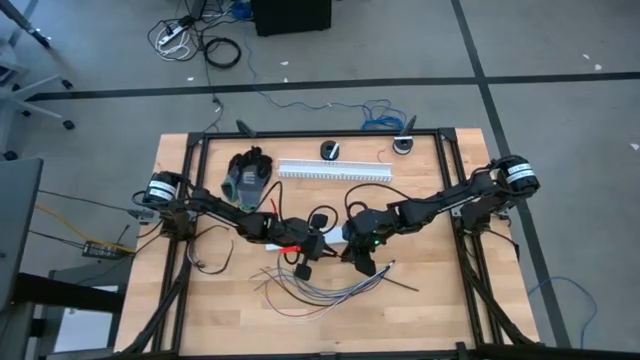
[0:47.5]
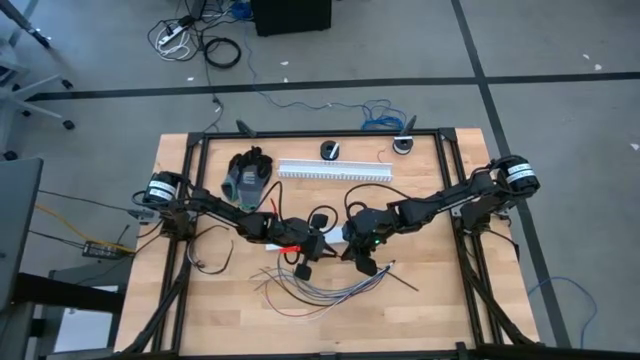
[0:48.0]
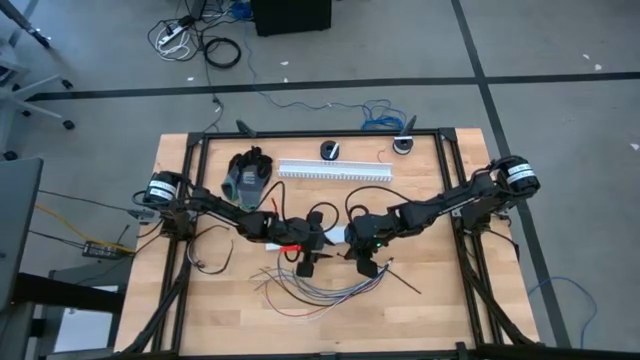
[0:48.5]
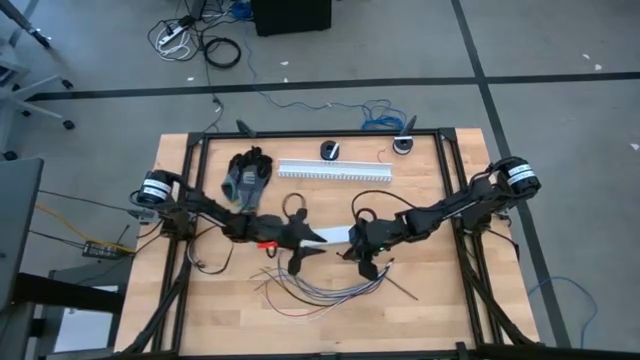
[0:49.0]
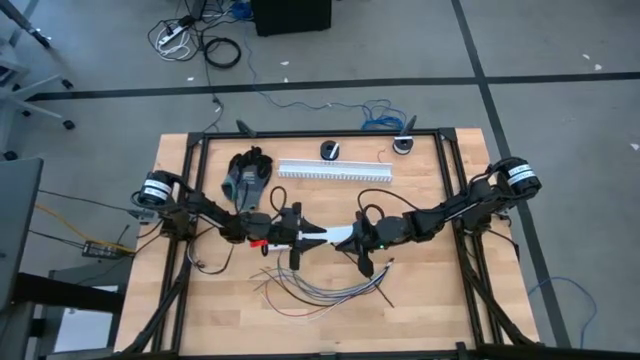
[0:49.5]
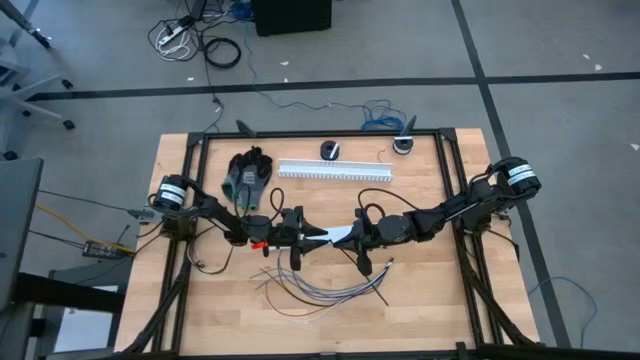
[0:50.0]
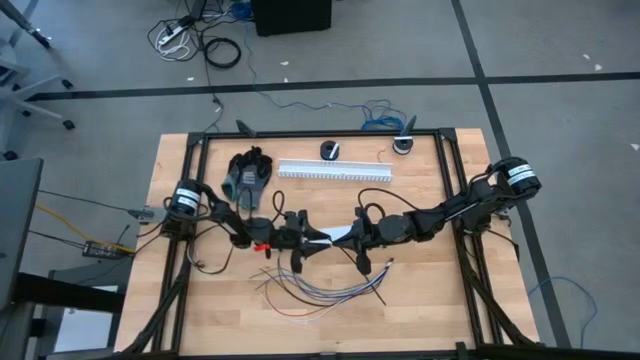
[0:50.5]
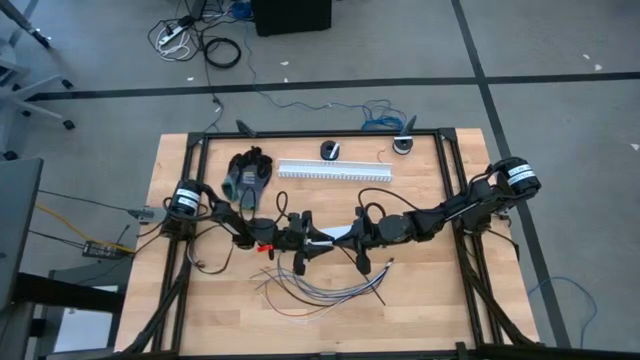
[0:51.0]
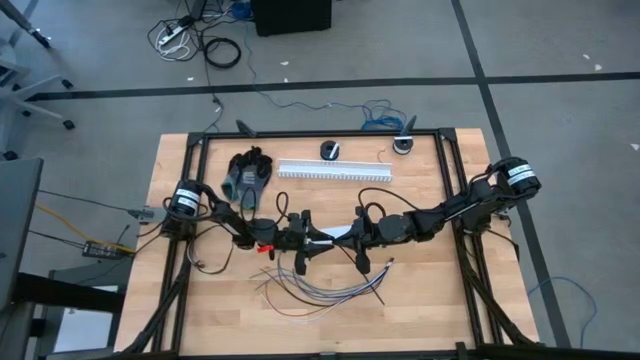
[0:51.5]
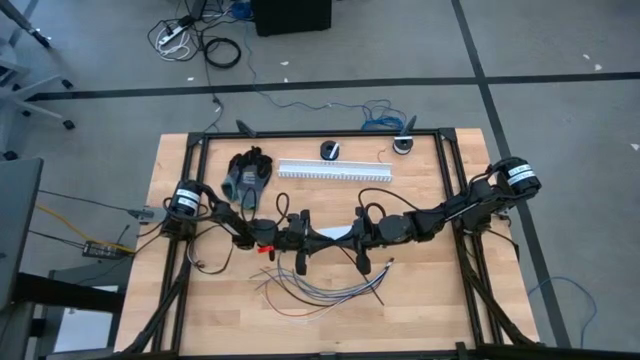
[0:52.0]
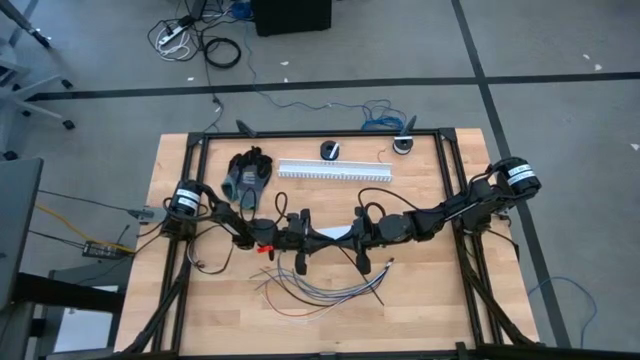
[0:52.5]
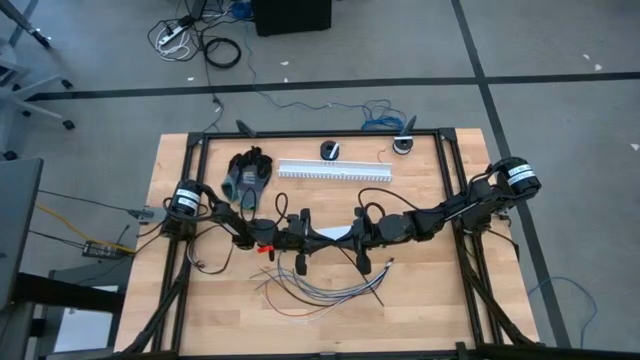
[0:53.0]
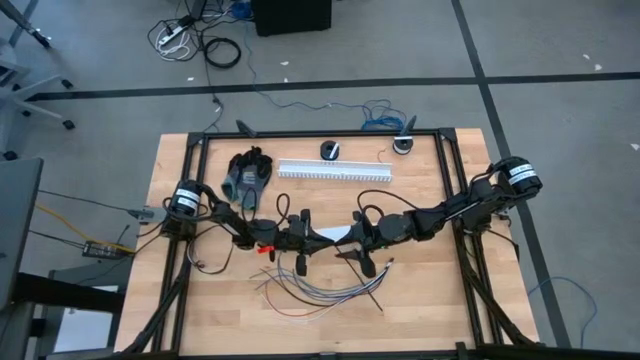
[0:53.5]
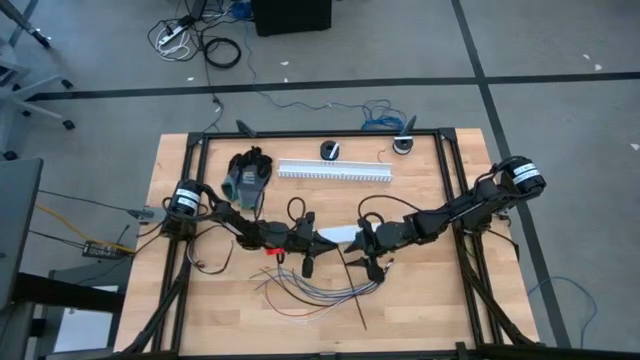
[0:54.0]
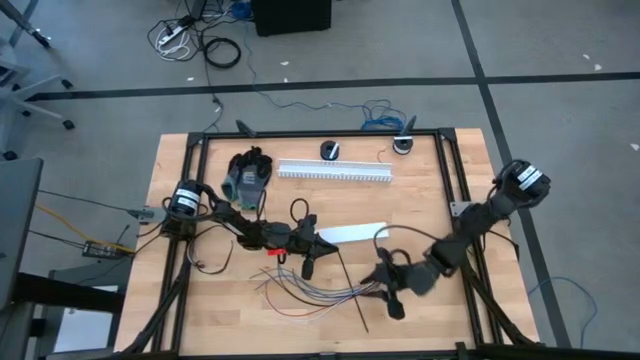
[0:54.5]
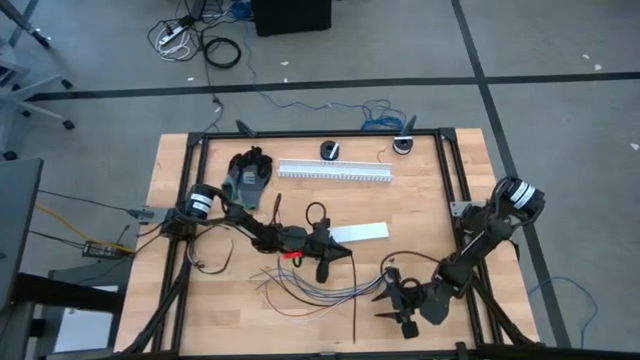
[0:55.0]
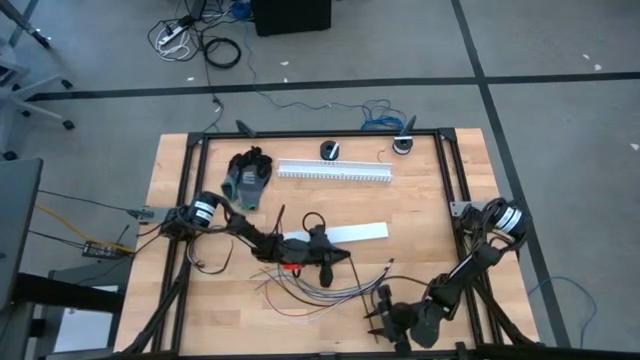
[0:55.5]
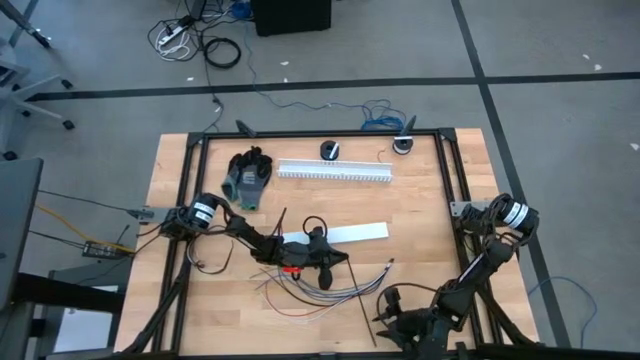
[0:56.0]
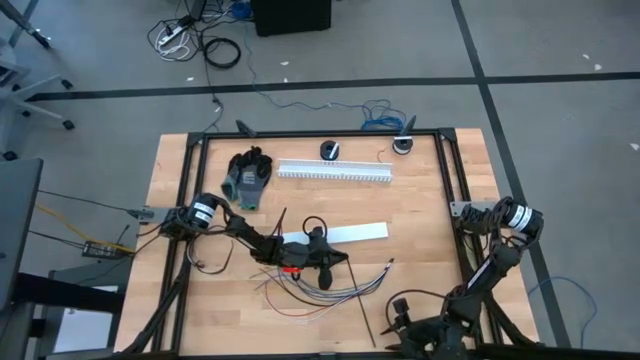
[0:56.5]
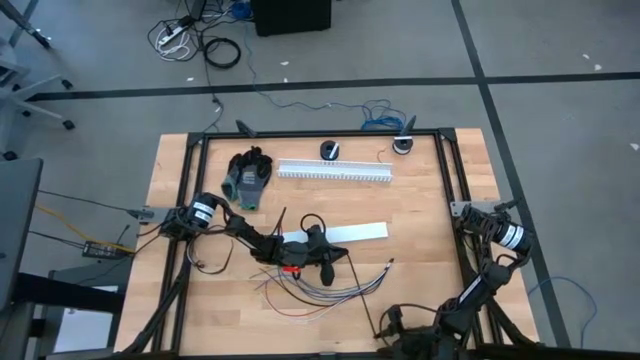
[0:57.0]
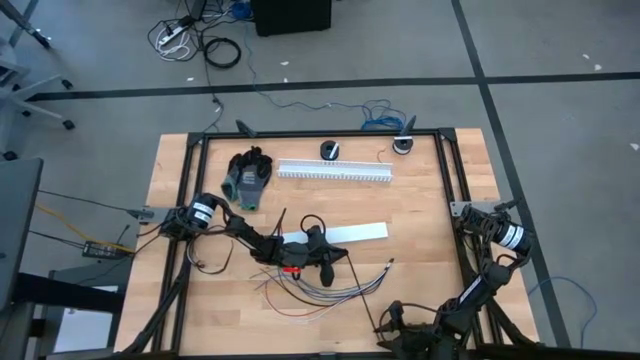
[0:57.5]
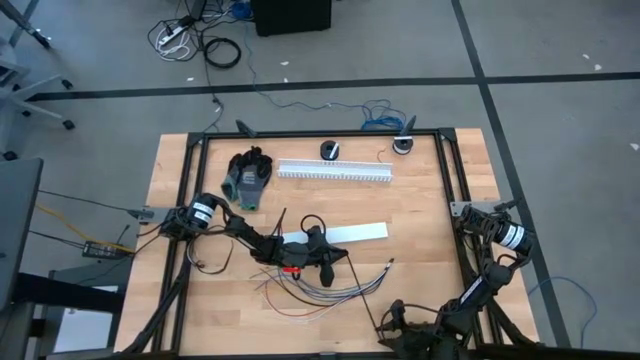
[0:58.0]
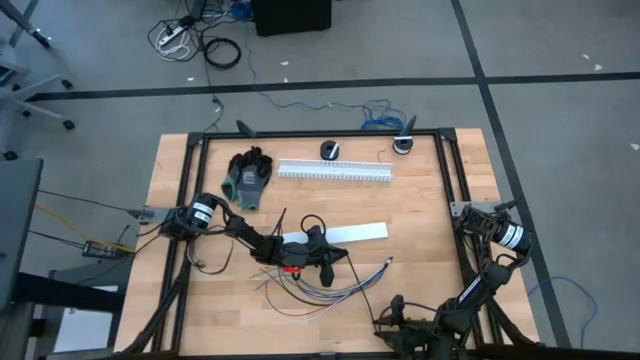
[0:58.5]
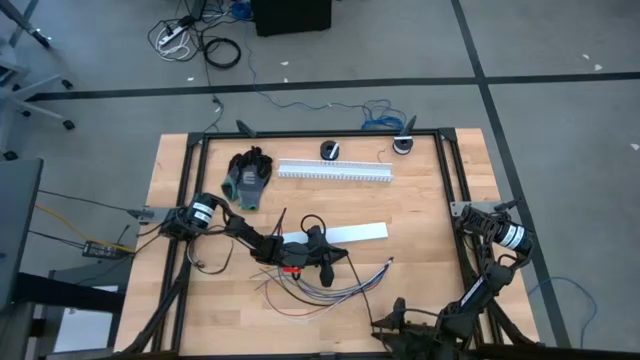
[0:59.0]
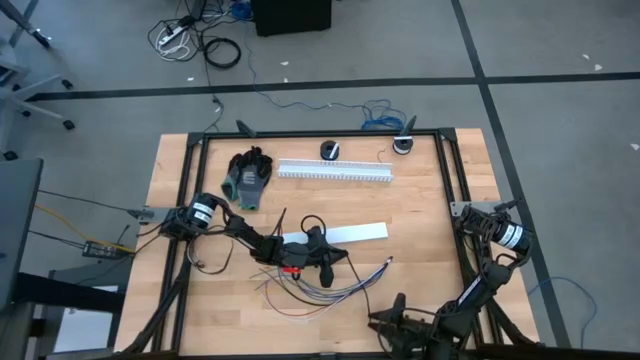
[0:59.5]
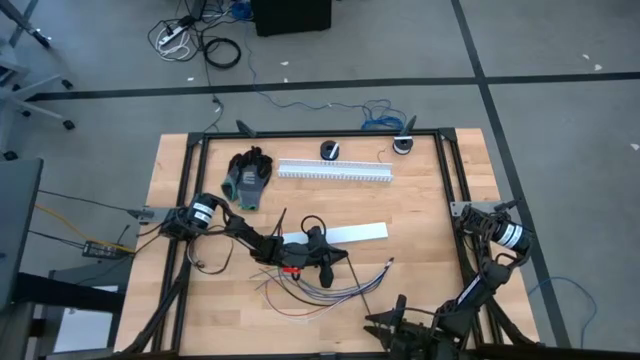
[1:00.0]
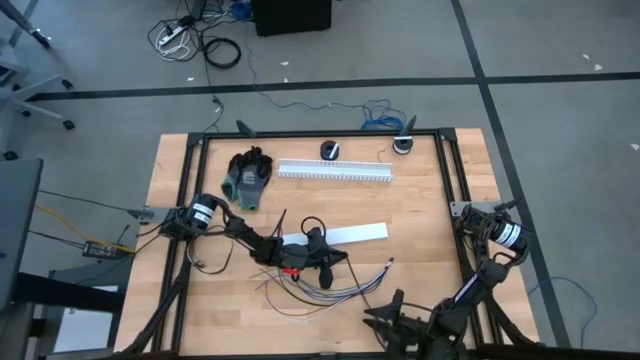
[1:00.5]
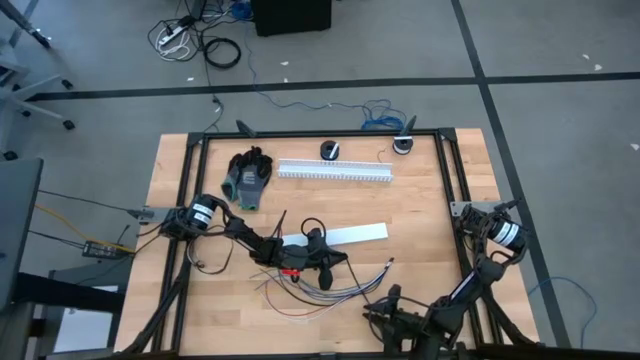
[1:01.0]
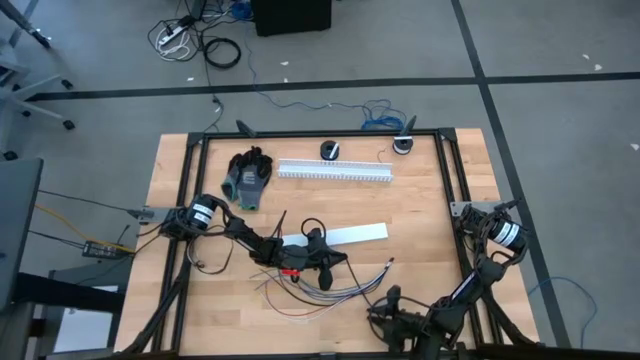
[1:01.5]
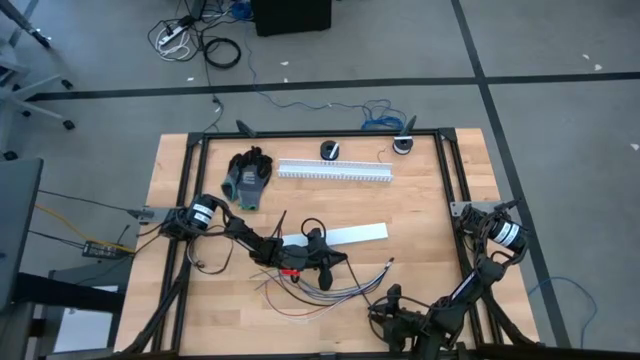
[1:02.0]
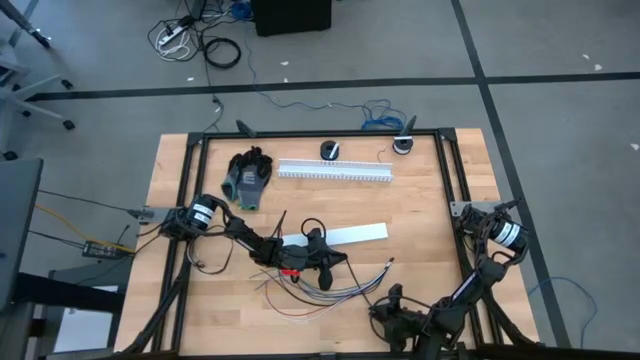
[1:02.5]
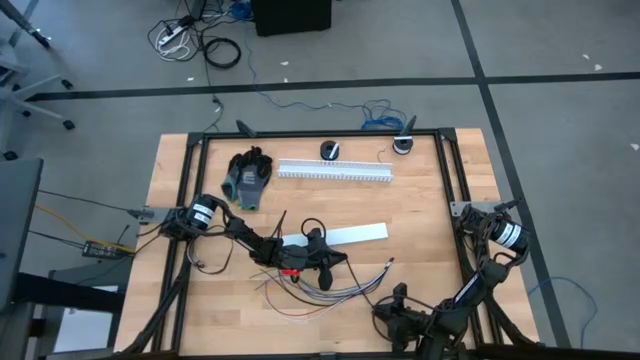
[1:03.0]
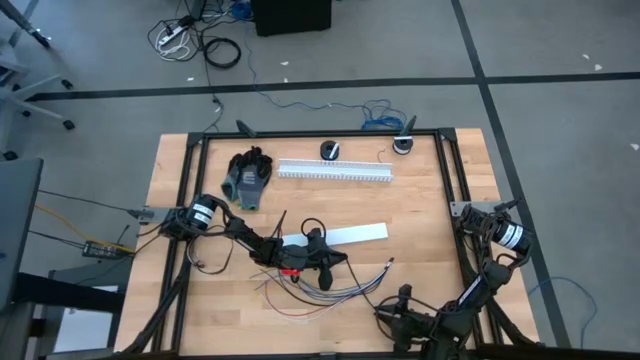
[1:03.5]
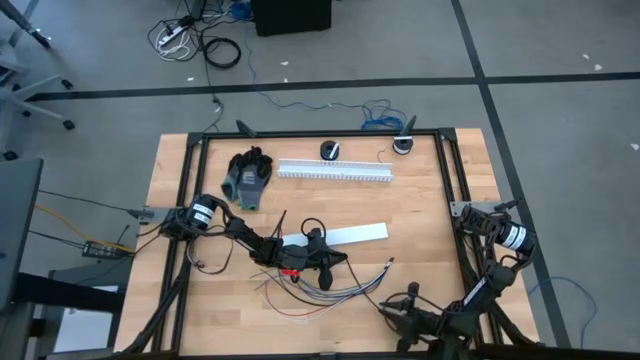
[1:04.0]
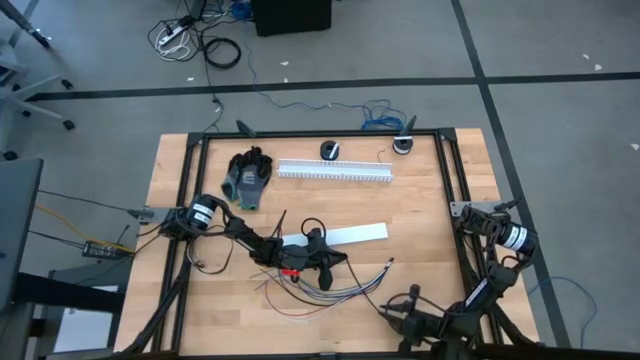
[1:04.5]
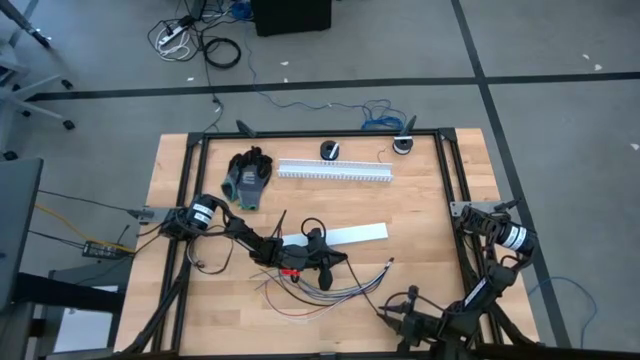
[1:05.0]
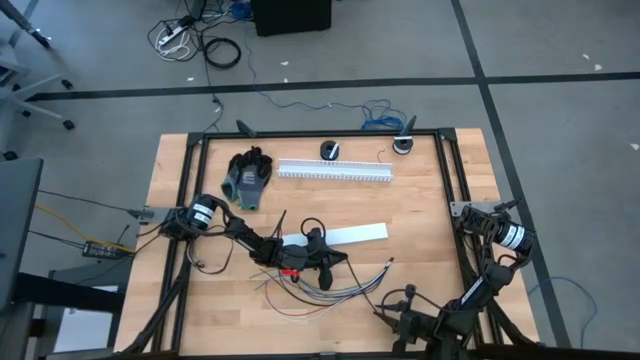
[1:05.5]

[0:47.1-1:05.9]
Task: Ziptie cables
Wrap the black zip tie around the cables

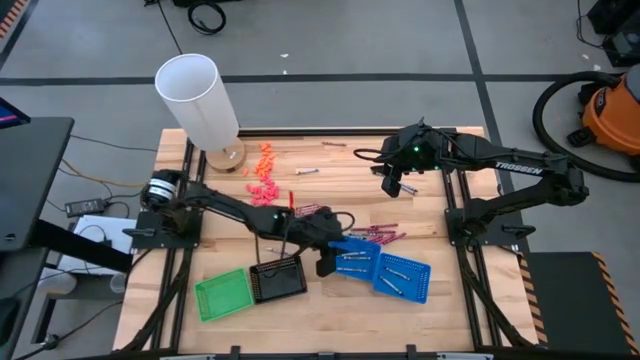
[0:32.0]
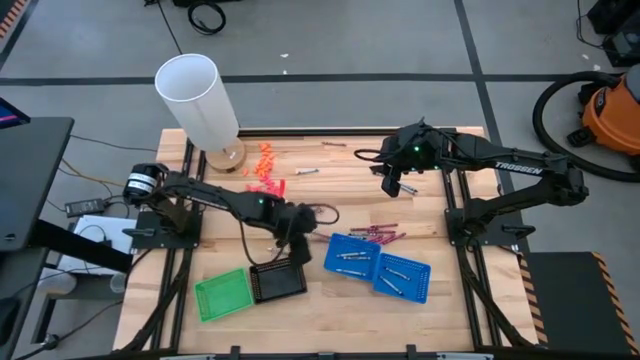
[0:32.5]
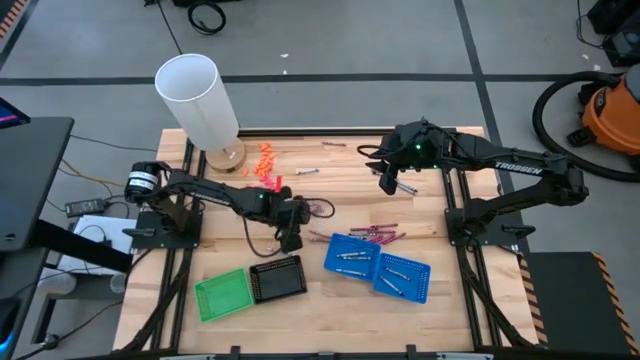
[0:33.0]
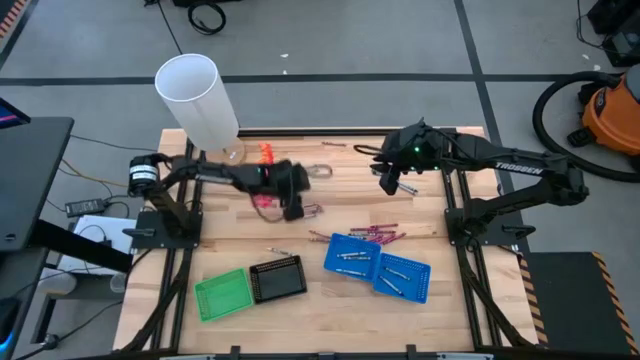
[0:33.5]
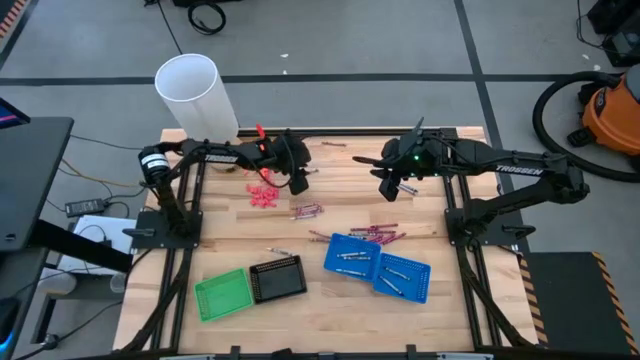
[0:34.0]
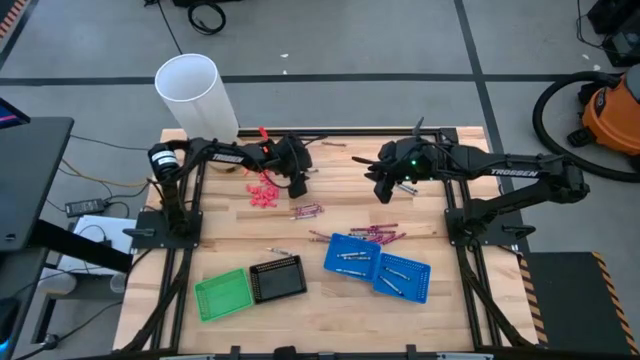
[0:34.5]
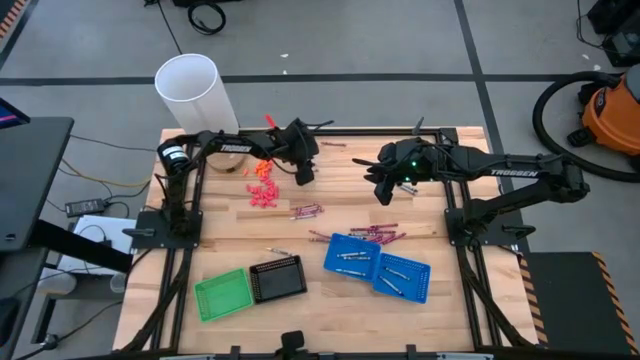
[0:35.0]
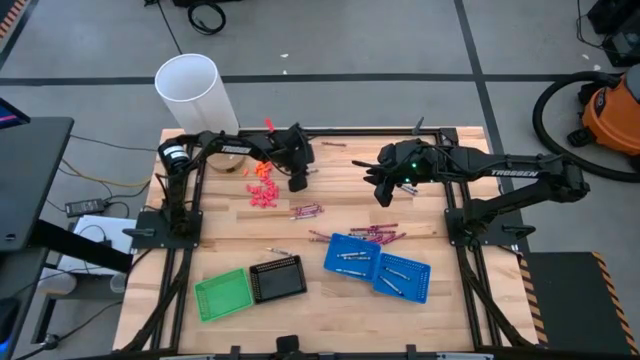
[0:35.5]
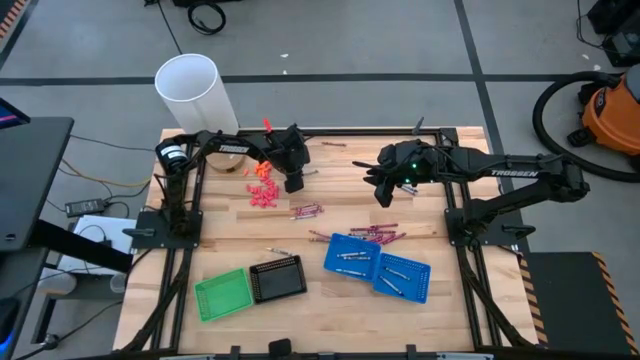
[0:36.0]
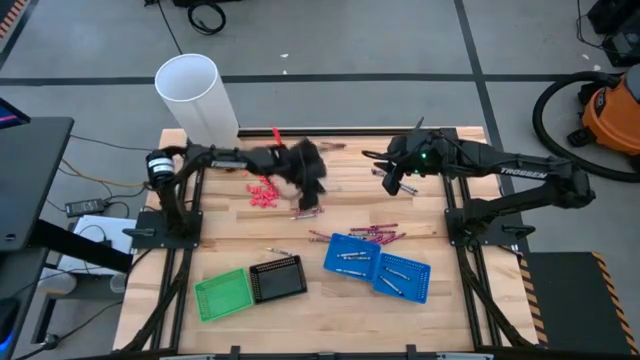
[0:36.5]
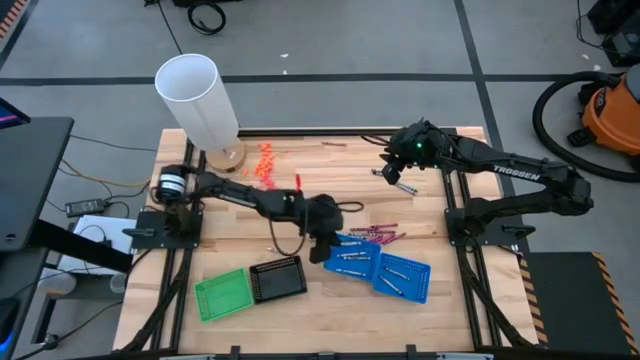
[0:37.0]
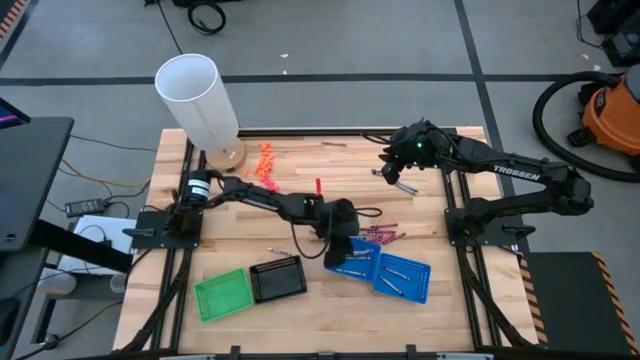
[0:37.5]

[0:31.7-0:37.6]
Task: Sort crayons
Put the white crayon into the left blue bin
